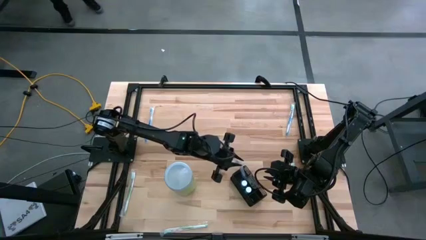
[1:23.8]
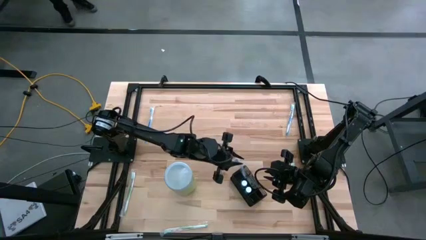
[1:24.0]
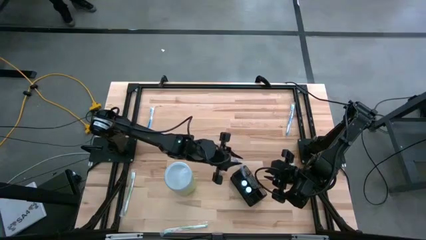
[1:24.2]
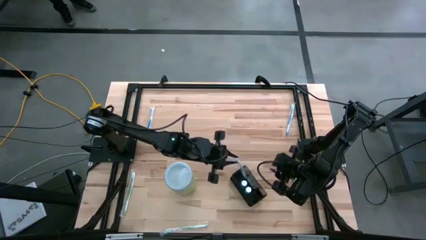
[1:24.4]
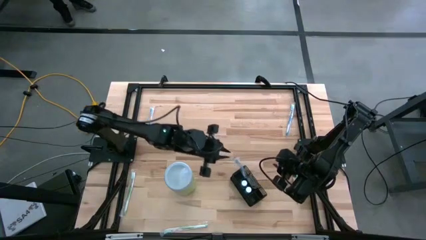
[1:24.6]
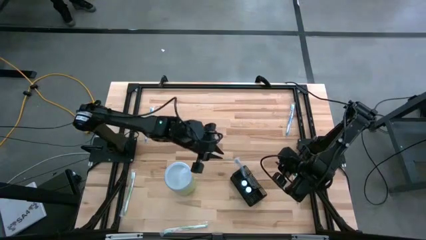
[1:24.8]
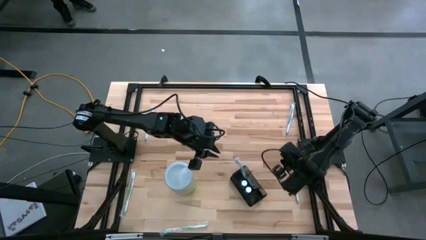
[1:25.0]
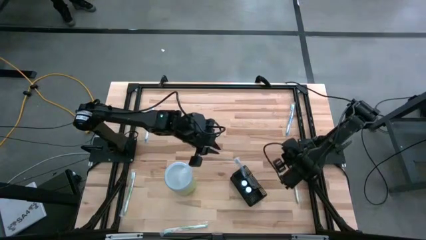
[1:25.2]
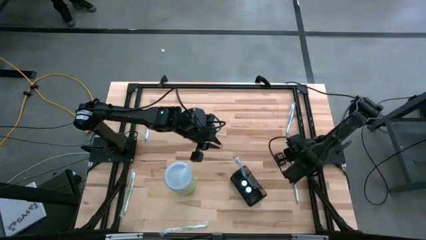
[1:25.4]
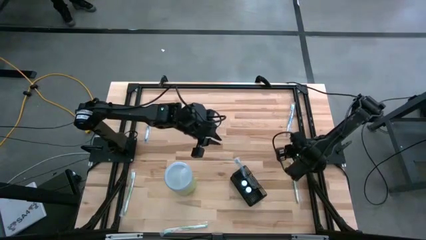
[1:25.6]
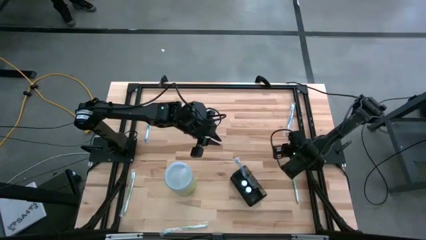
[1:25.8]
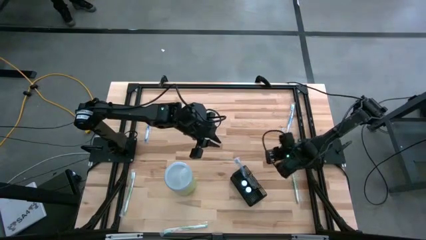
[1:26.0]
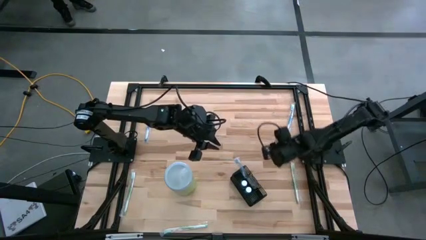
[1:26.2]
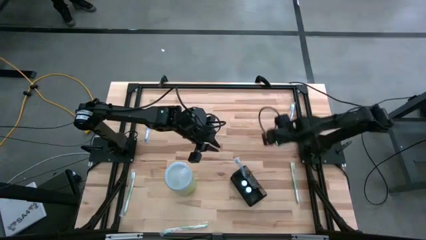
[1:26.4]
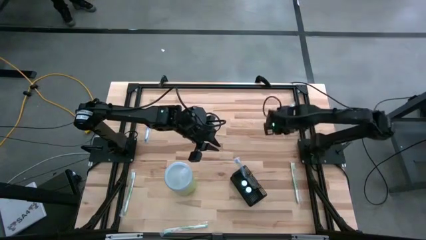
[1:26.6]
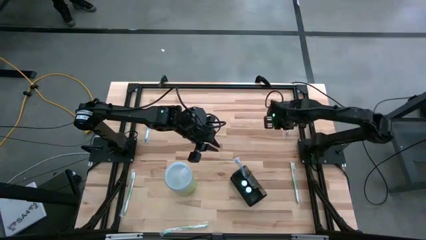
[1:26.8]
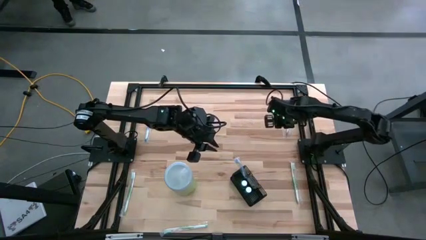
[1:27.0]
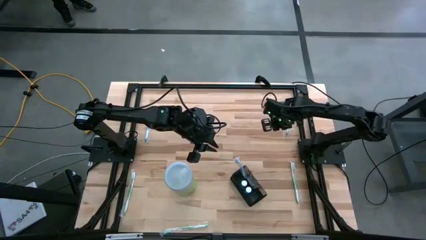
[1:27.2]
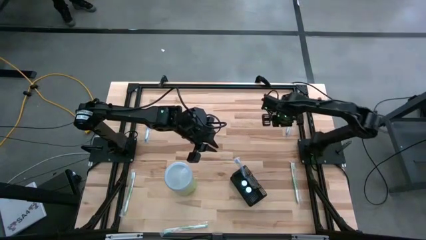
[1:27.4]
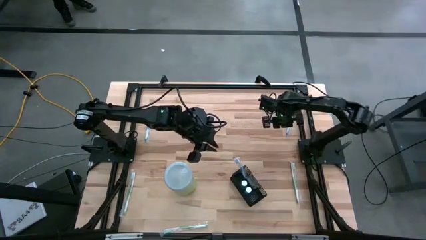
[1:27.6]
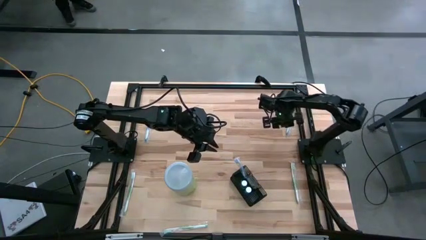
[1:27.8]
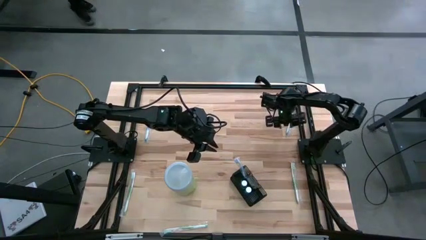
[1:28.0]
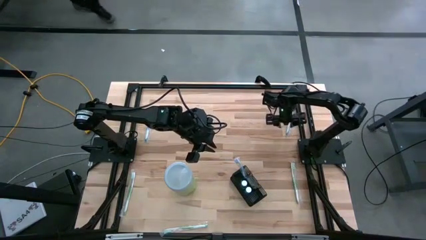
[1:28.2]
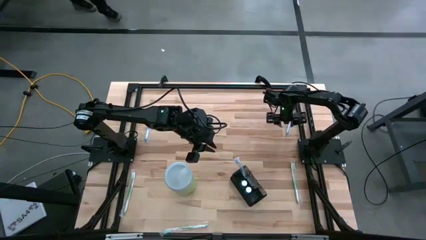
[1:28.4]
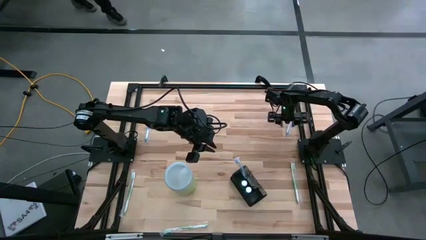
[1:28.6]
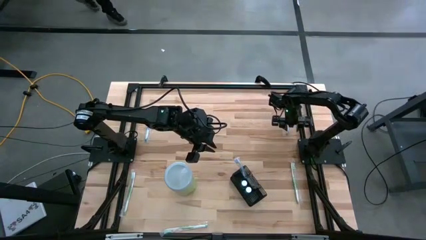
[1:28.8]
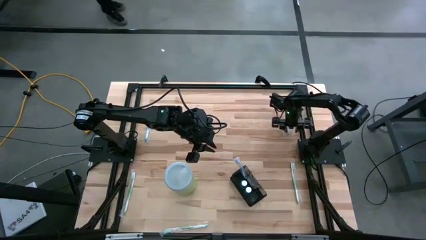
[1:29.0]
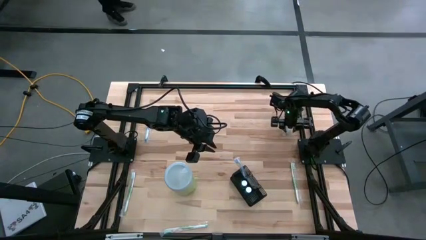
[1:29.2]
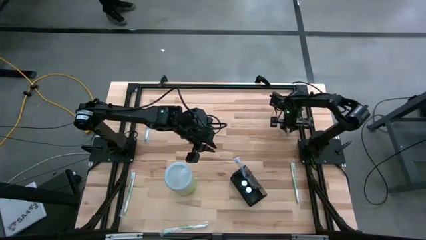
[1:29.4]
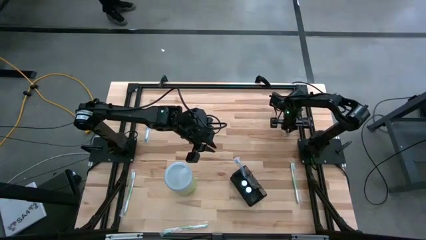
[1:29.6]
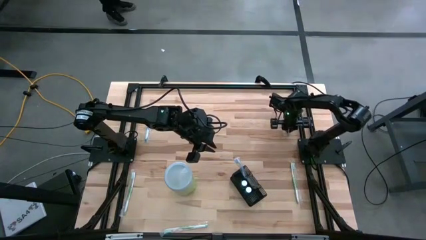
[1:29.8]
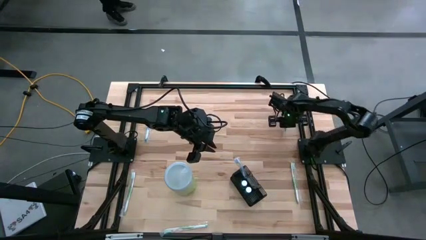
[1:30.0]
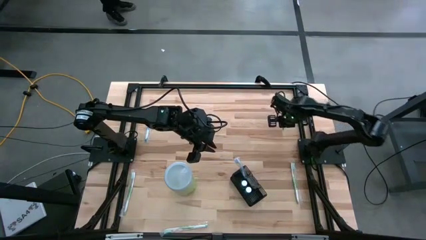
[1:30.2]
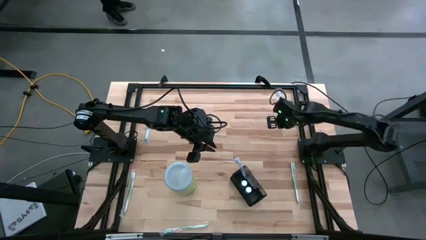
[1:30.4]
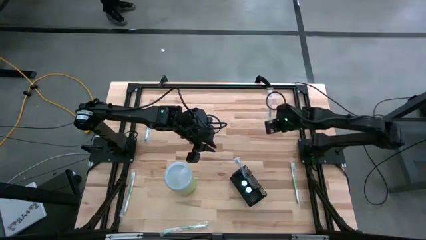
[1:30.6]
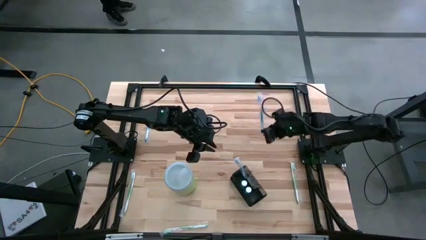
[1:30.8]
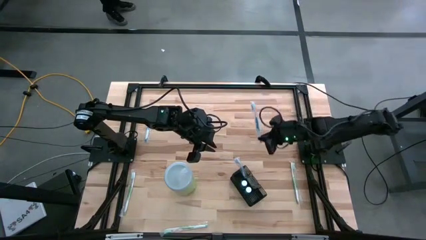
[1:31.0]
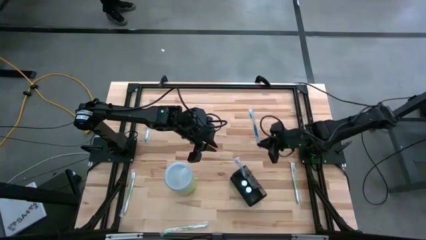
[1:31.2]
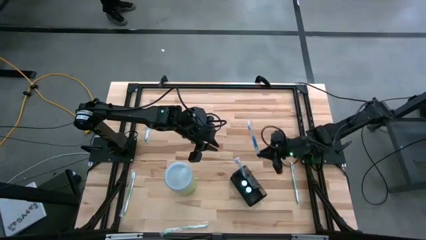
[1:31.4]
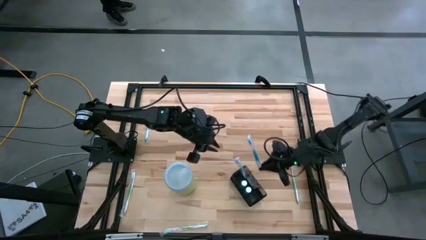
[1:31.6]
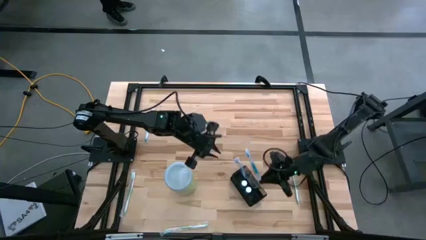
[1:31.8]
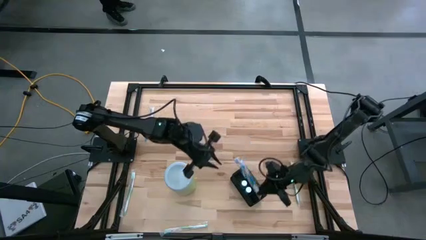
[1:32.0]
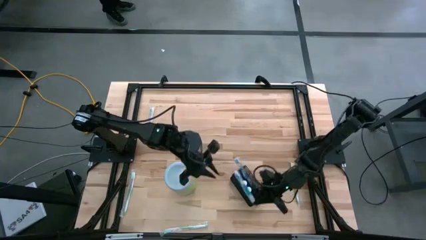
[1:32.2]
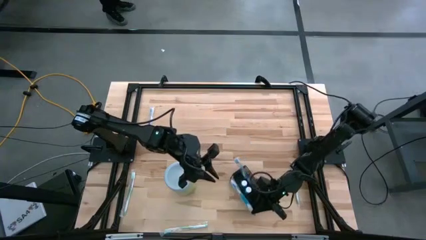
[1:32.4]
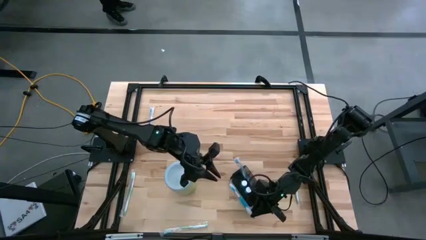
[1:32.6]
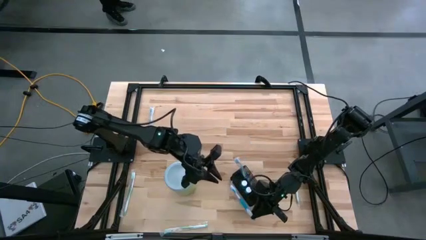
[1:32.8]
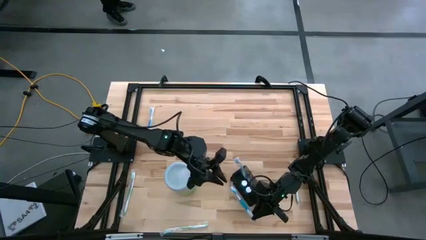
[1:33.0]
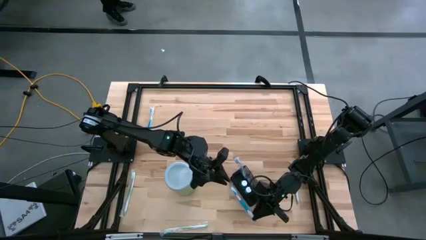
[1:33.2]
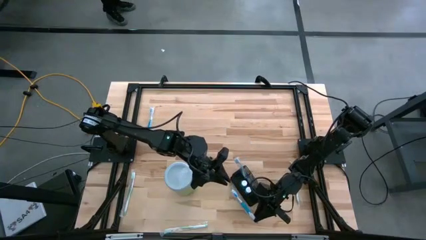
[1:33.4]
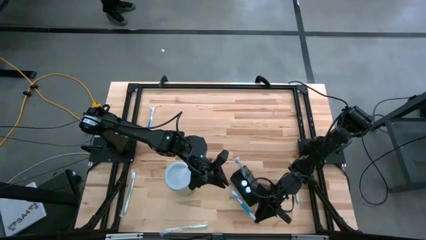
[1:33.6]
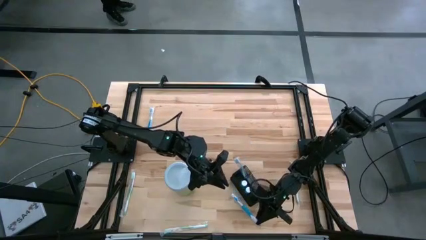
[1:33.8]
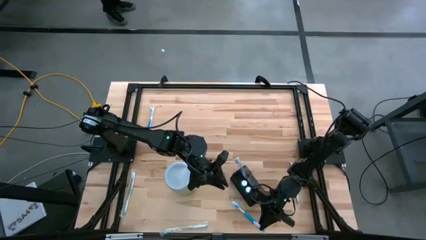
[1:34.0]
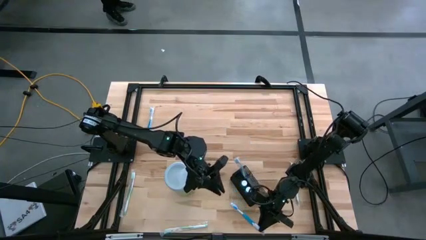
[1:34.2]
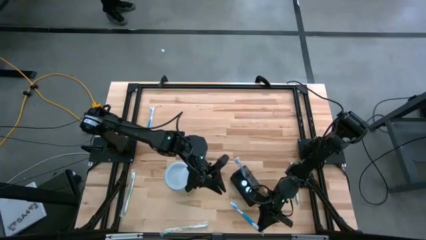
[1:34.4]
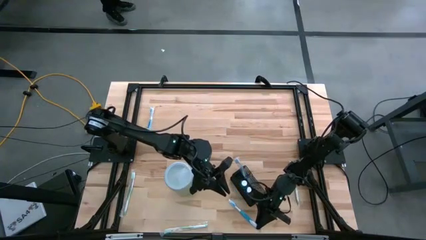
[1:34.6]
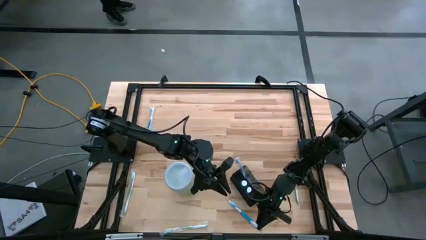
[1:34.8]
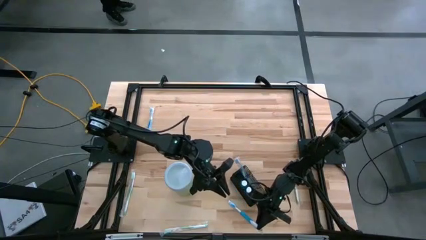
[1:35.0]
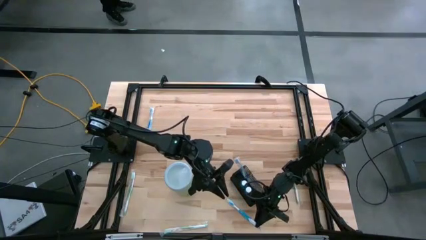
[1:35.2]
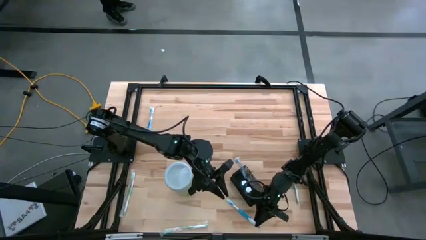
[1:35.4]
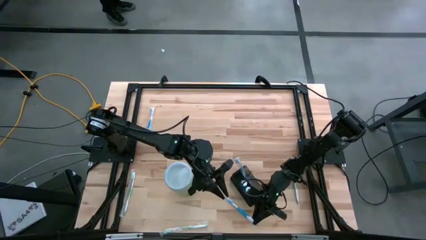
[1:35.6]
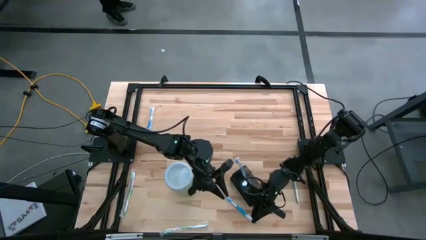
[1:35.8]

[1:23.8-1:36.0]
Task: Pick & Place toothbrushing station
Put the right blue toothbrush into the black mesh organizer

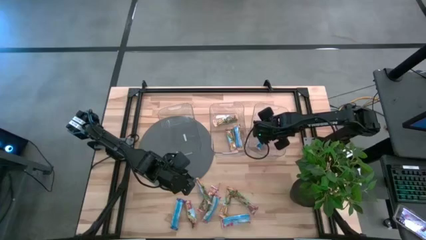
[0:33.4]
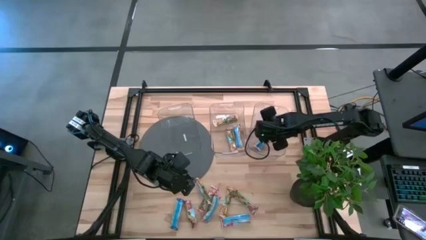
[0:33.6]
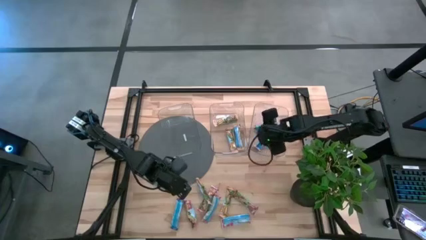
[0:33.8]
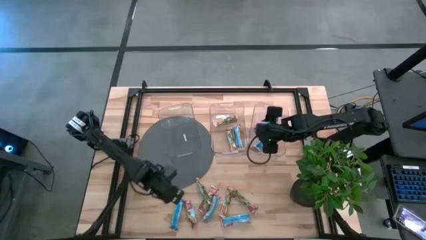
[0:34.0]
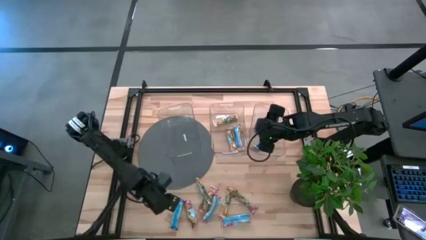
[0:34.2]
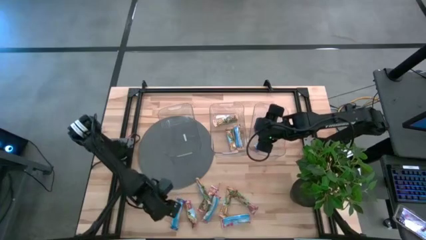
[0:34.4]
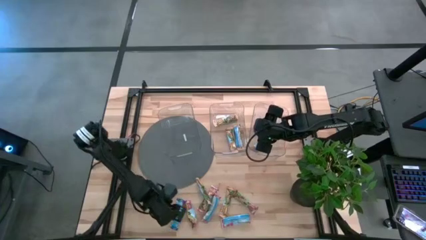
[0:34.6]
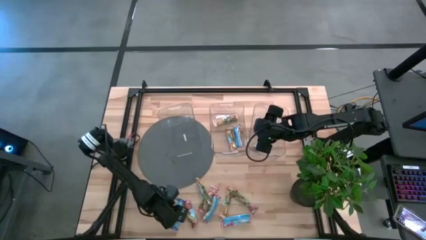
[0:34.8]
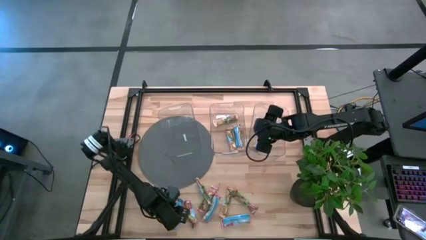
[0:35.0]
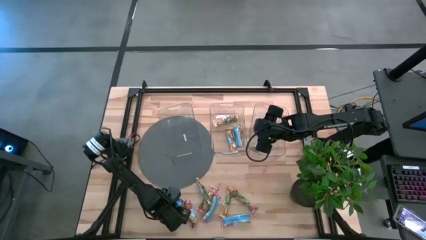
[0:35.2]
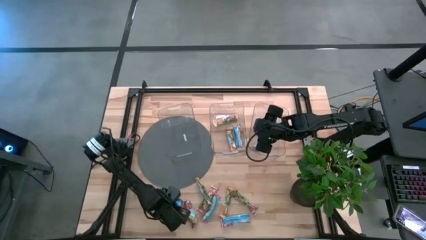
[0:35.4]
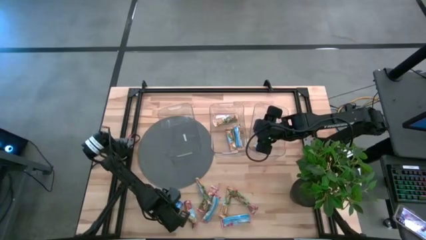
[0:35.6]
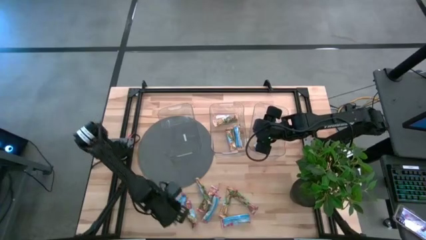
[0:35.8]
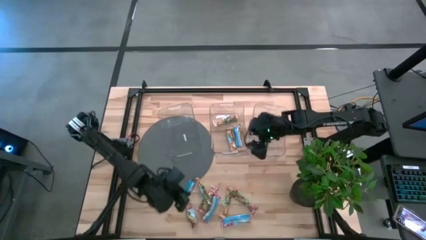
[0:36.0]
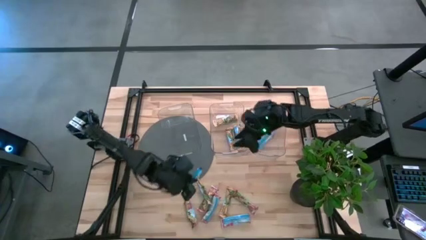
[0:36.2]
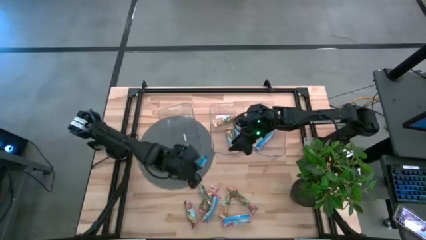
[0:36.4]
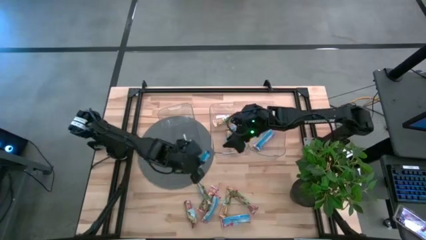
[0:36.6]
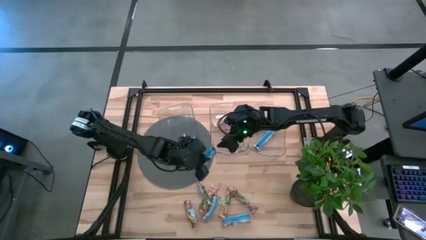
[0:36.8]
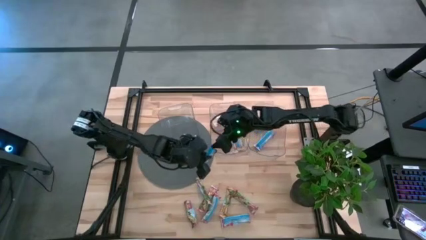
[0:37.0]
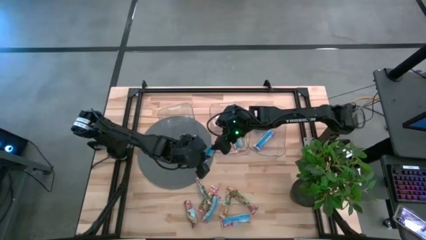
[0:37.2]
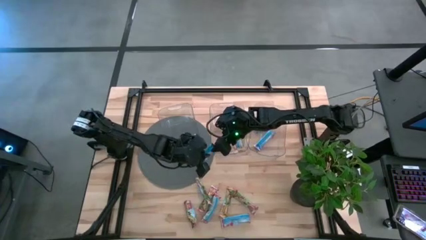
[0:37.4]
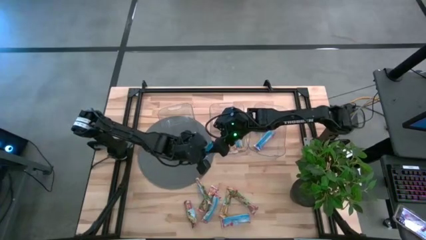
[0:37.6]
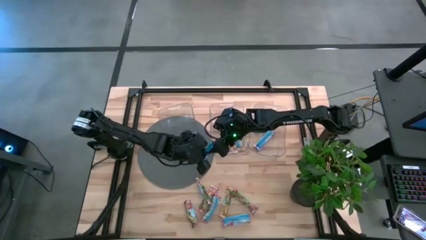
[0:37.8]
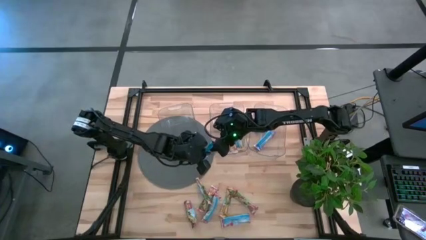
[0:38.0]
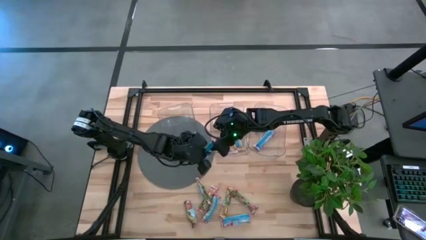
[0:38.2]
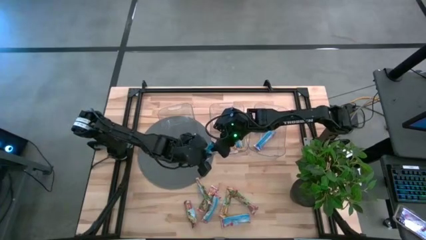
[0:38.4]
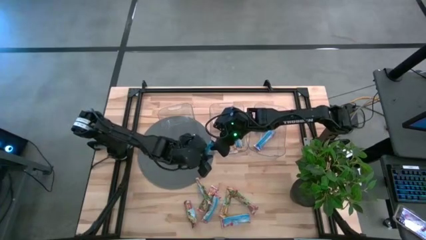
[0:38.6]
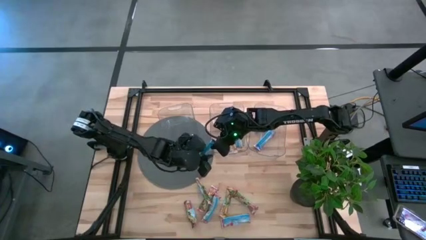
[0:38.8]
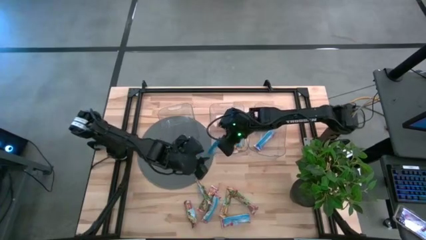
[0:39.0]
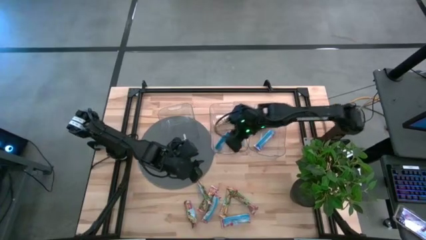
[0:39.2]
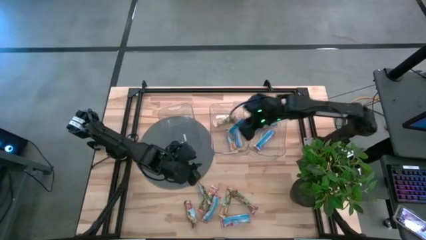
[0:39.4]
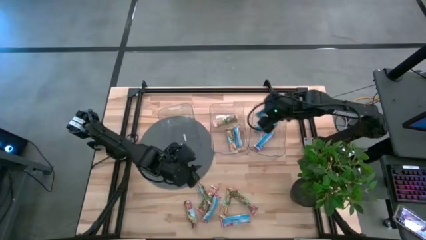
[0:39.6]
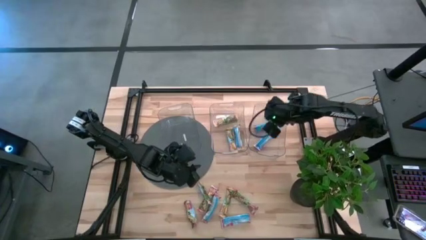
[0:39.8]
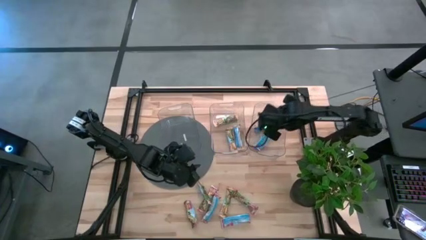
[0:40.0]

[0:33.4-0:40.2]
Task: Pick and place Granola Bars by type
Put the blue granola bar into the right transparent bin
